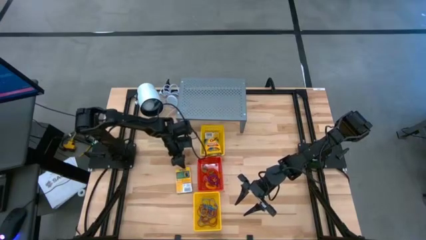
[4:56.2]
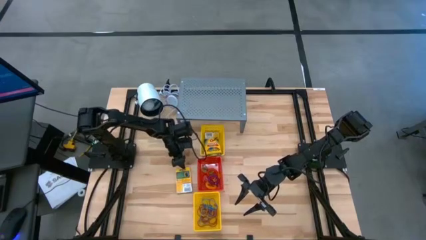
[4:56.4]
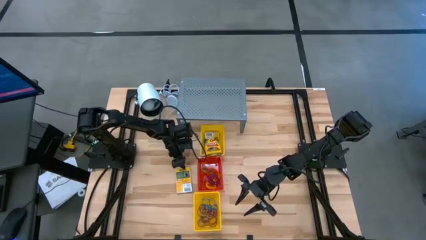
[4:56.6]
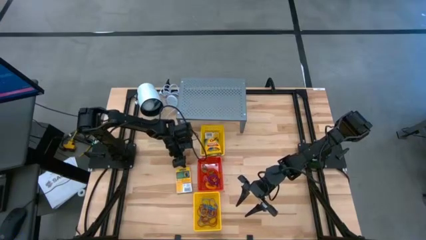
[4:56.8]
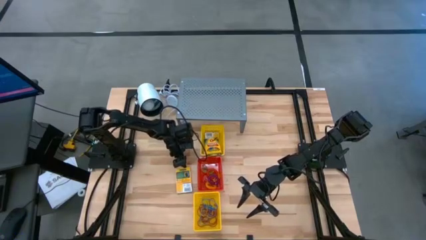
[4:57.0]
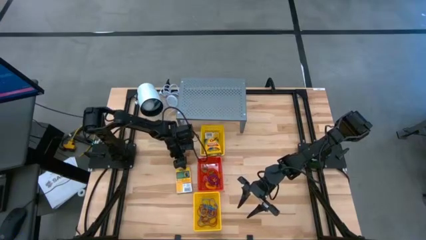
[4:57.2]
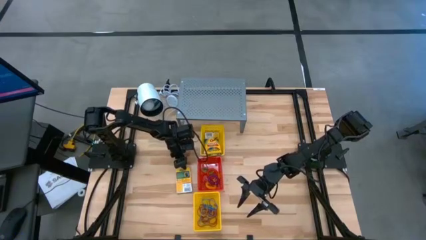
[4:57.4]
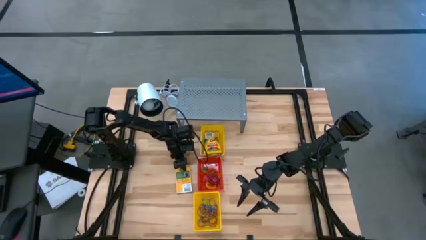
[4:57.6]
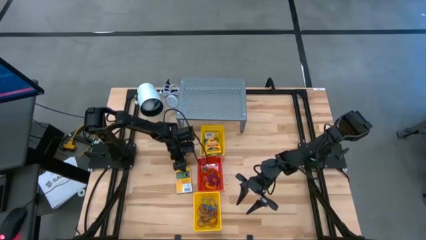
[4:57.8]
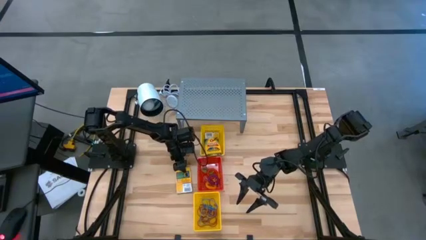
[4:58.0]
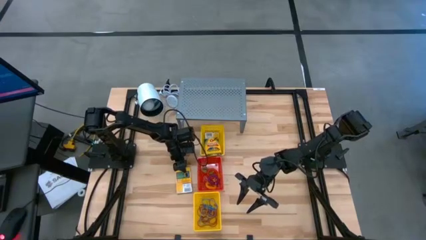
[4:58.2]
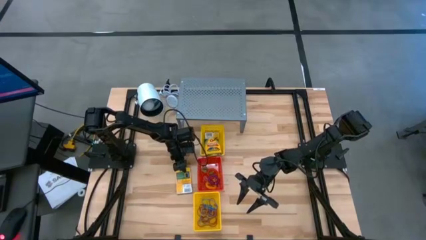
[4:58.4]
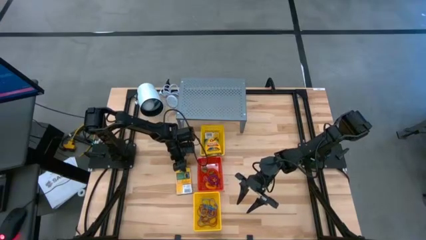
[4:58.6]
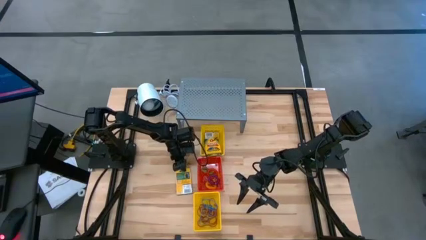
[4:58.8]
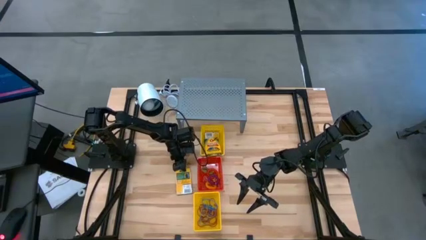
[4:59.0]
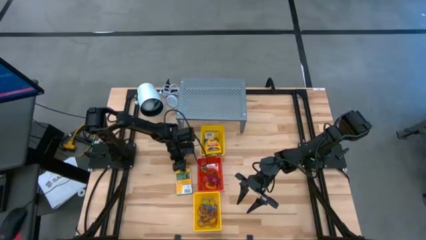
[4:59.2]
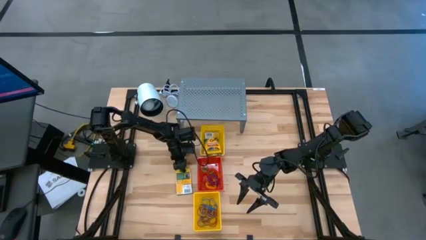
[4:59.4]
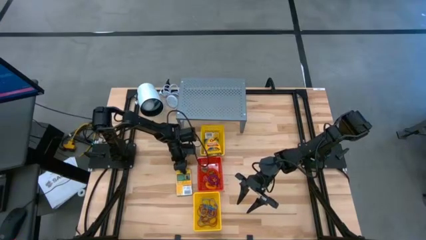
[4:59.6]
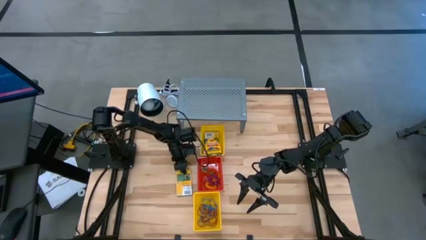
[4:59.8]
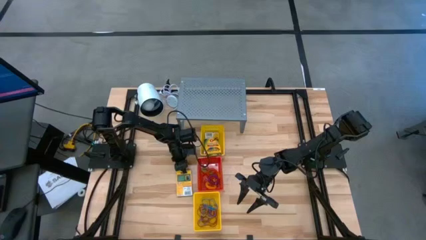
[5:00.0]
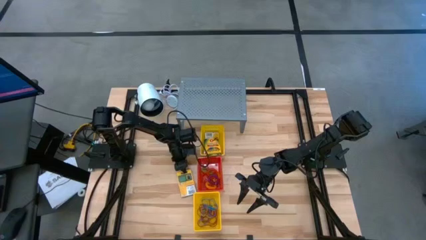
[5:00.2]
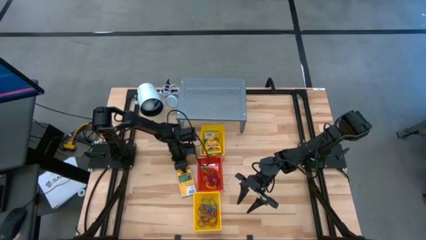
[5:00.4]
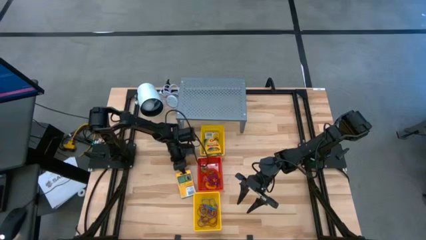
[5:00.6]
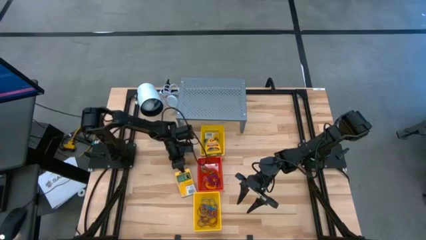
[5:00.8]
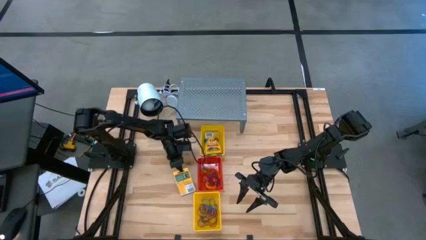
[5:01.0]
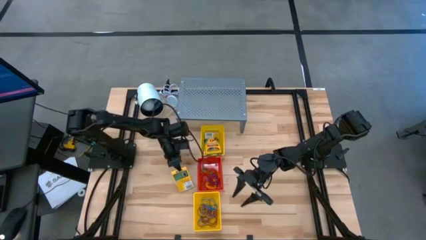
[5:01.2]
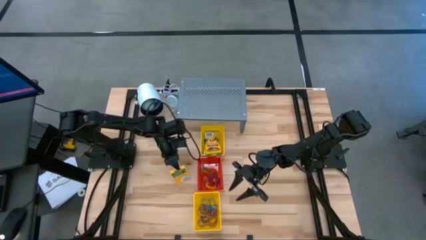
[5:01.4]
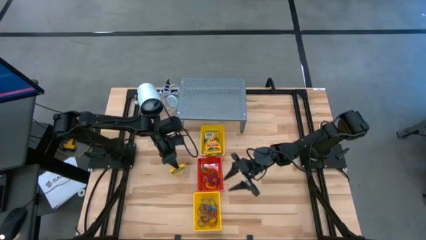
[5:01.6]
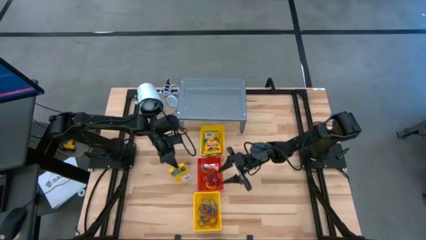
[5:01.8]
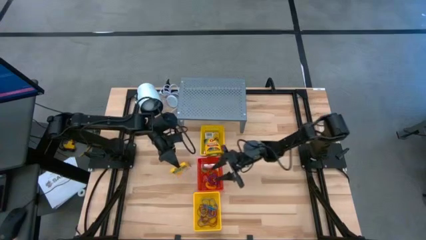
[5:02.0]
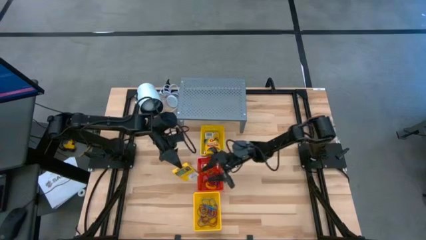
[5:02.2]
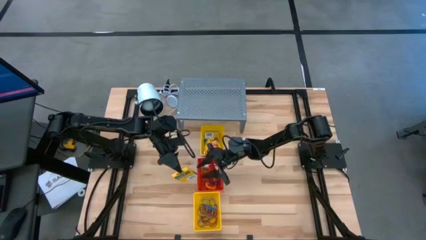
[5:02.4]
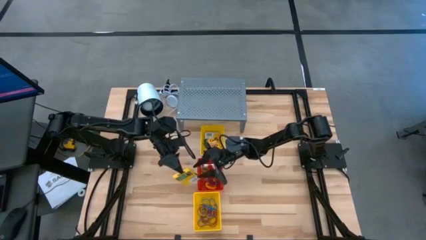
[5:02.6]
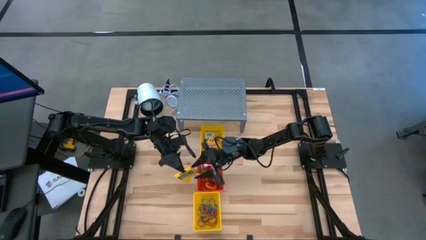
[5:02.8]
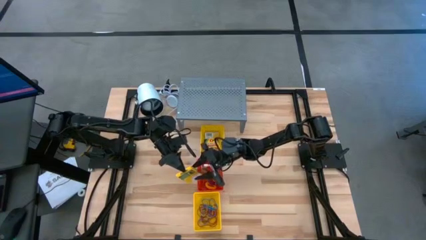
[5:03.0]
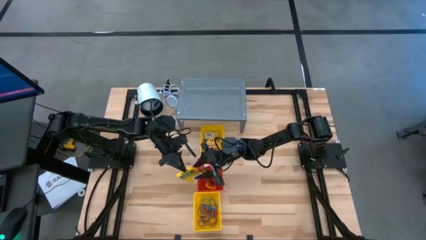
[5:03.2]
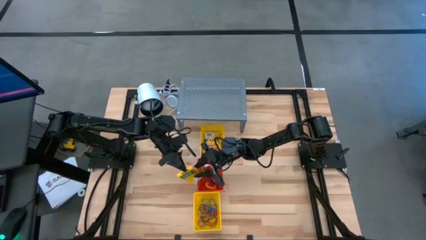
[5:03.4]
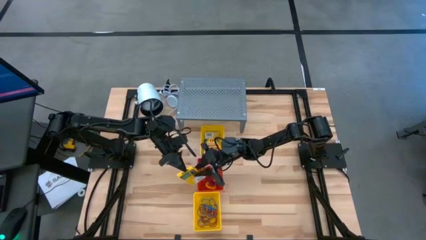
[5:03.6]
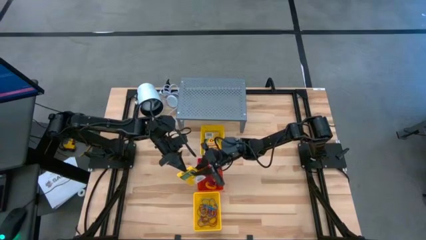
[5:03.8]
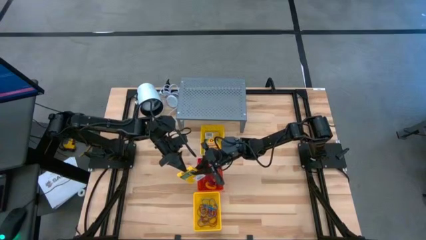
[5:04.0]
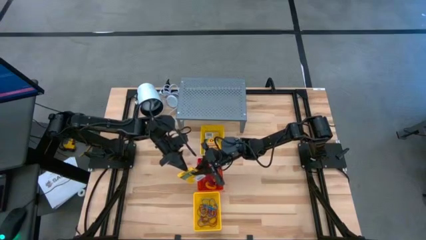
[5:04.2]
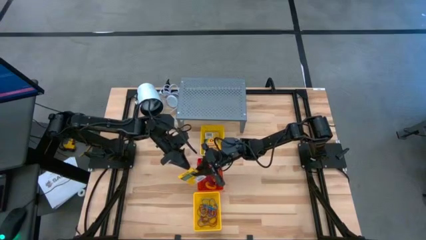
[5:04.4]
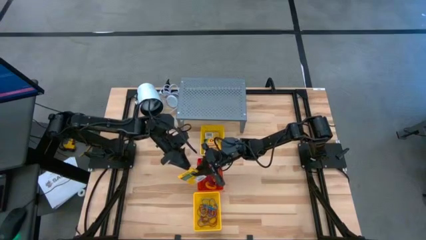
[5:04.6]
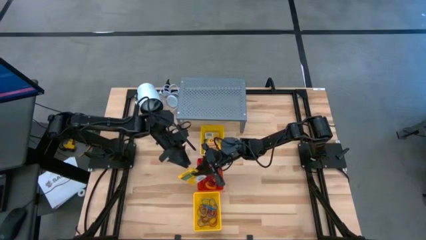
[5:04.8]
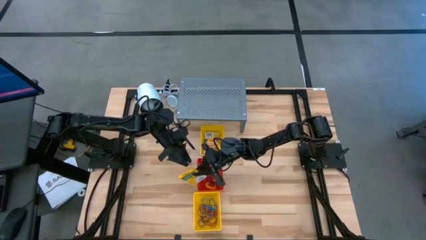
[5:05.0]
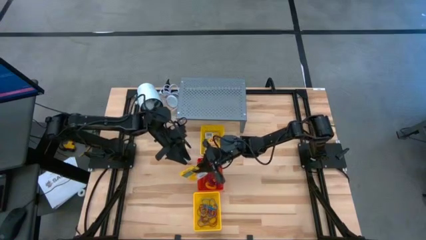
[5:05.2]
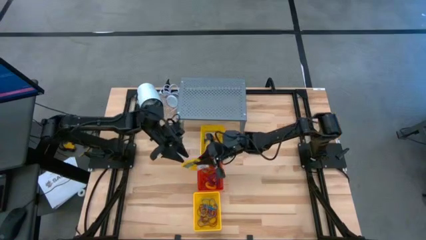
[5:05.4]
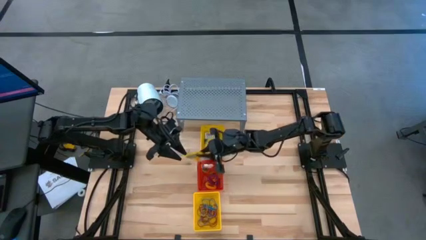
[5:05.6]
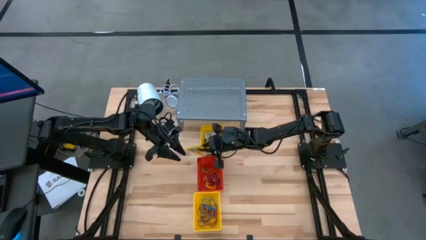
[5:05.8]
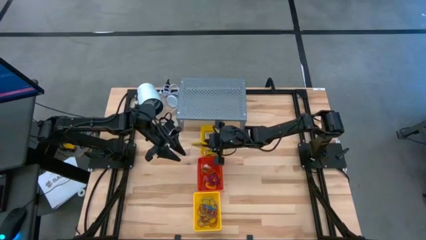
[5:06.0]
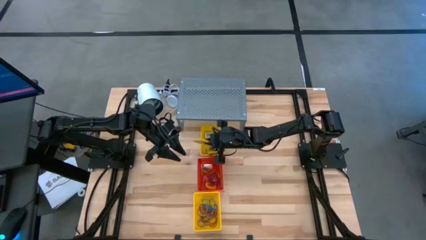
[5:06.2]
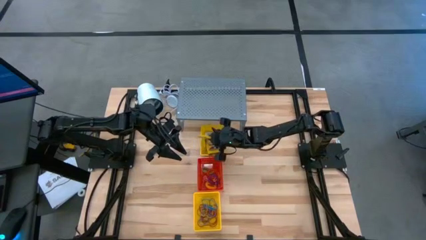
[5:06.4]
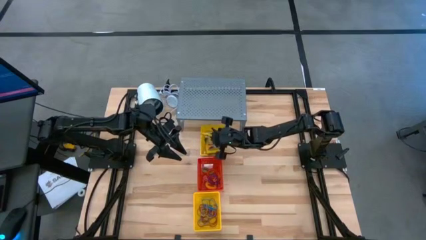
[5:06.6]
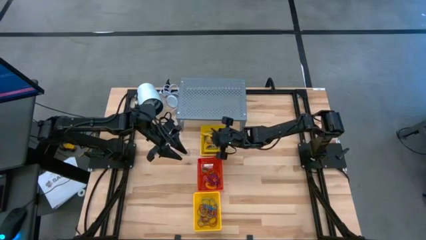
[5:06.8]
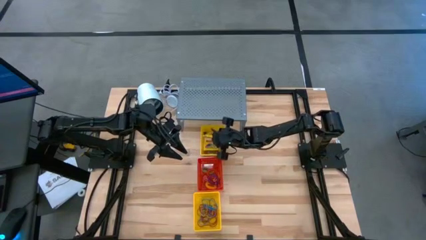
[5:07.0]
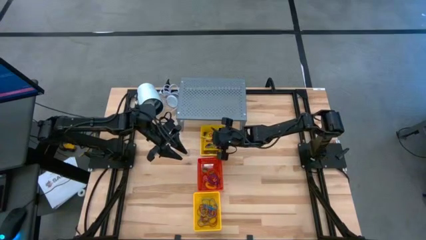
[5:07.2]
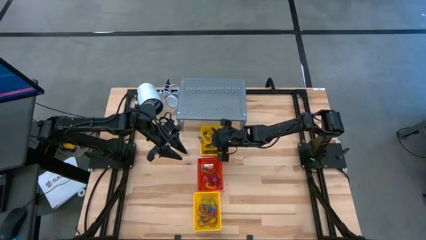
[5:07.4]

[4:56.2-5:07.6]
Task: Pick & Place Office Desk Supplies
Put the crayon into the top yellow bin

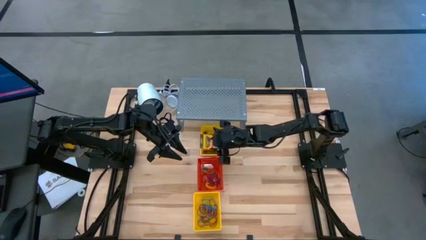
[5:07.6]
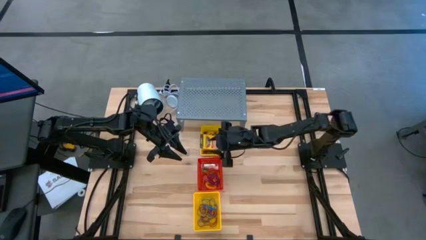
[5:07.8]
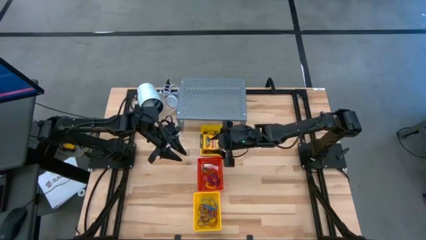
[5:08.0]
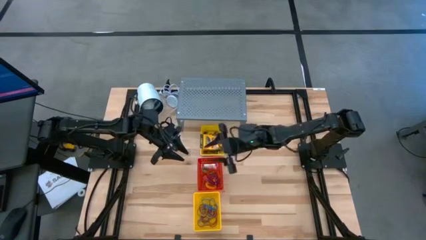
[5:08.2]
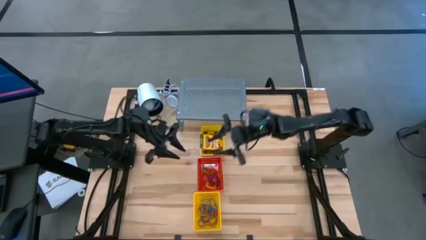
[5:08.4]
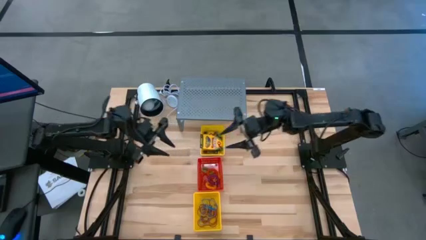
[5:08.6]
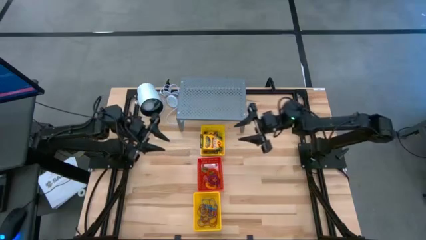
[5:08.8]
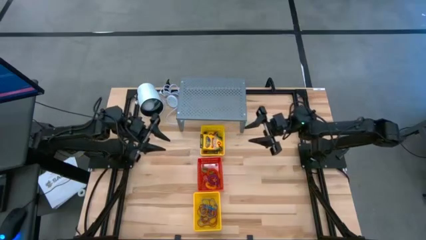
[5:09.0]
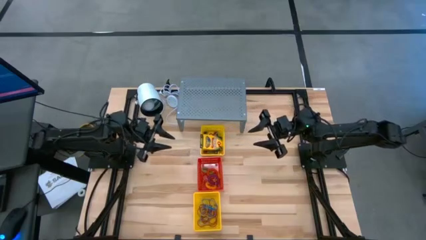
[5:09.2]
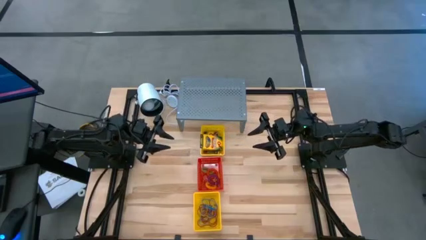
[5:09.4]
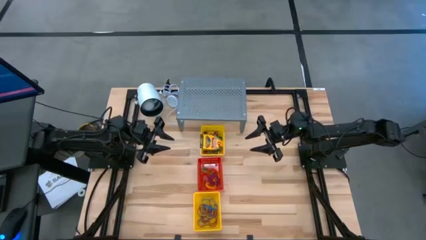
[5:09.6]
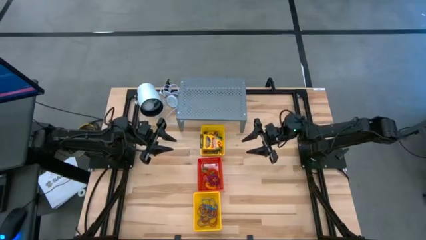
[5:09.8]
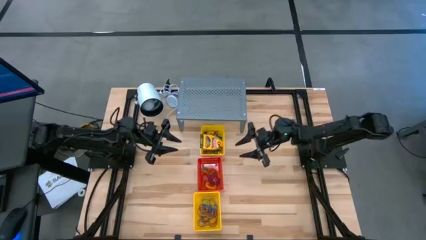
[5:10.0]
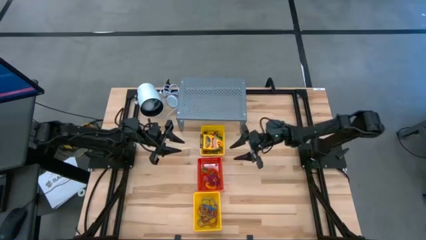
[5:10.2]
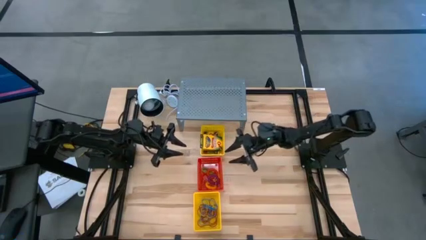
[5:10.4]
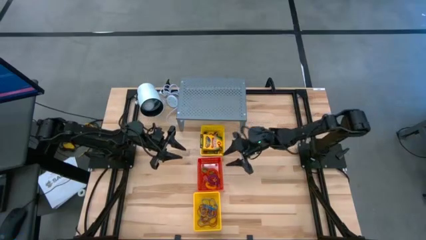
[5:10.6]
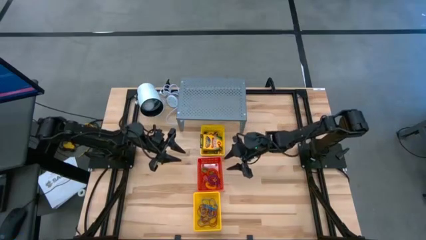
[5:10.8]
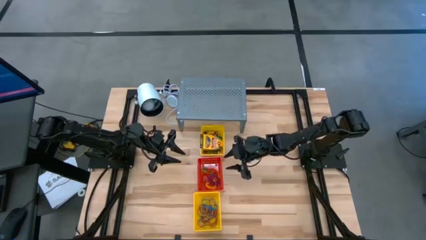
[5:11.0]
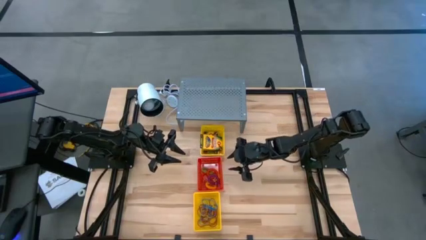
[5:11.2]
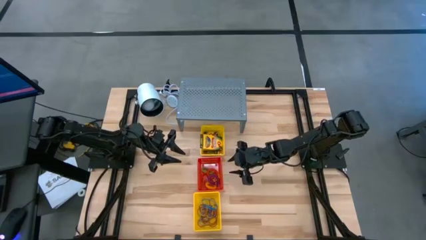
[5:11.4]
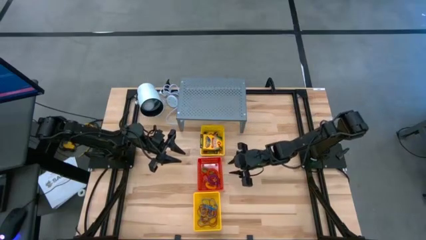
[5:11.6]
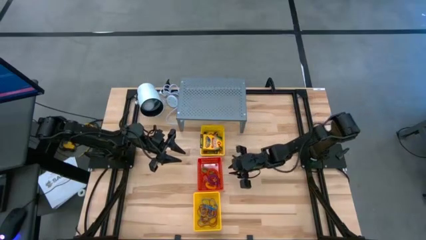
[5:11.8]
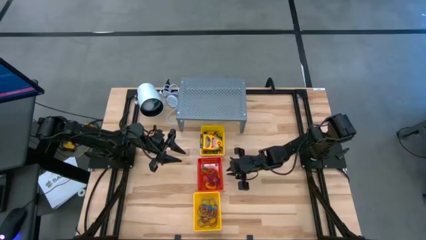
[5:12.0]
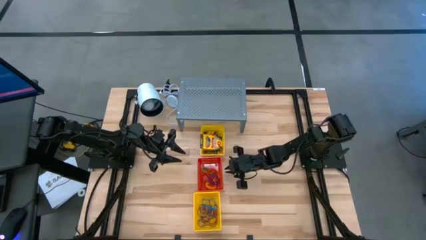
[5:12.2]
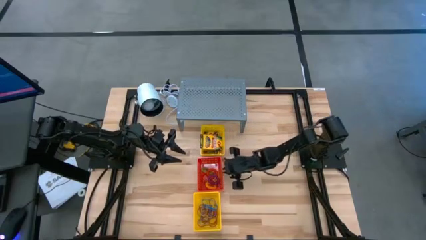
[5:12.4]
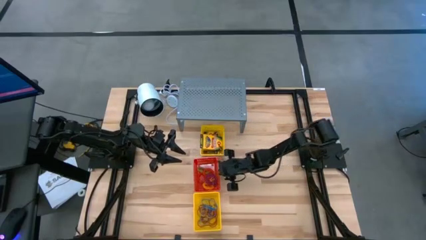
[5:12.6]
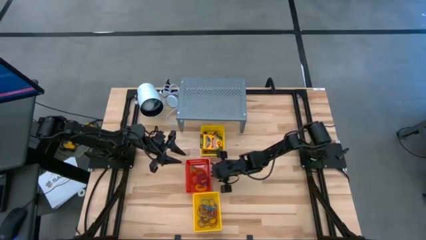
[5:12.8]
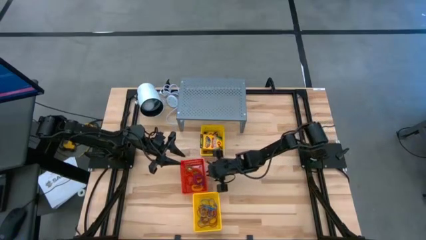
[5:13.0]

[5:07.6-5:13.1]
Adjust the red bin
